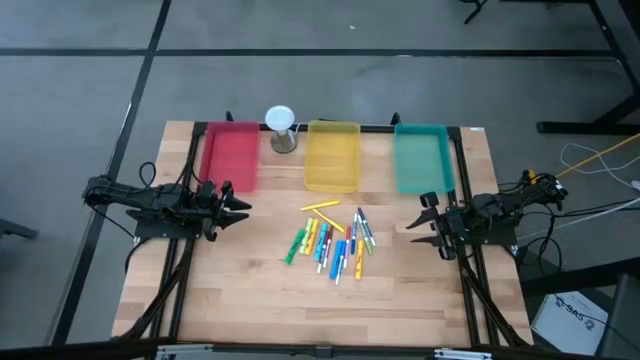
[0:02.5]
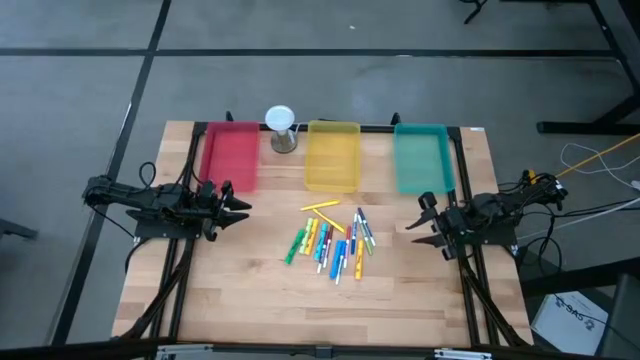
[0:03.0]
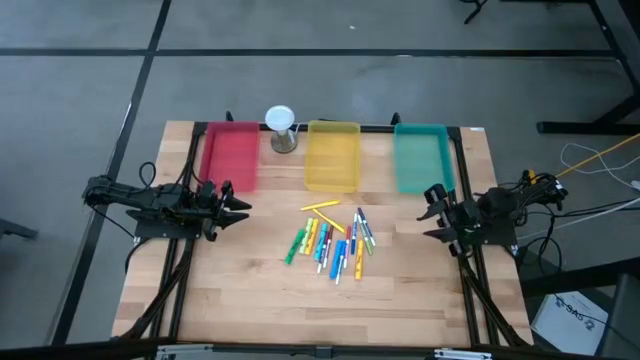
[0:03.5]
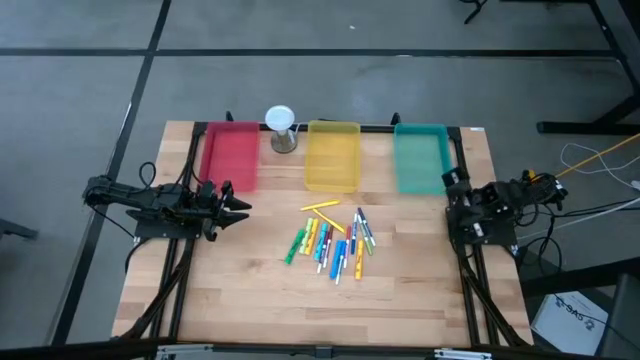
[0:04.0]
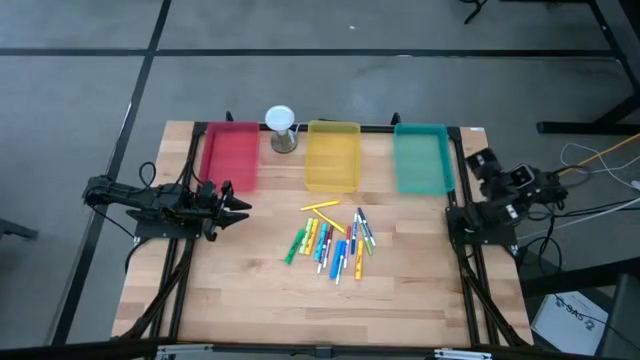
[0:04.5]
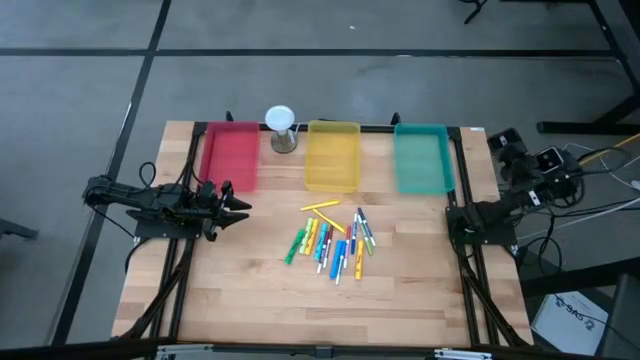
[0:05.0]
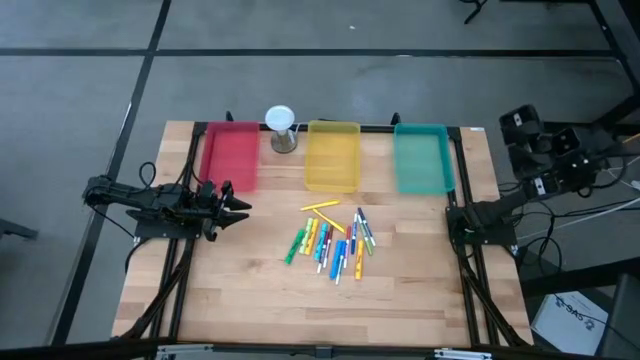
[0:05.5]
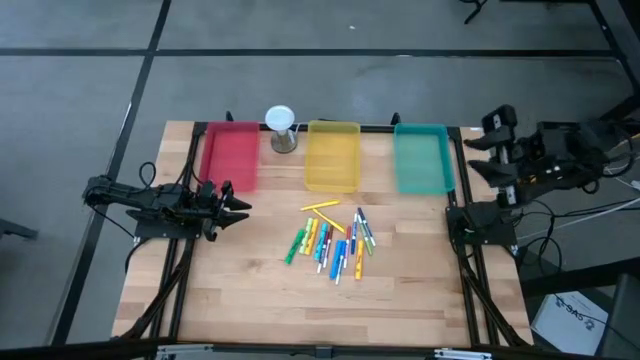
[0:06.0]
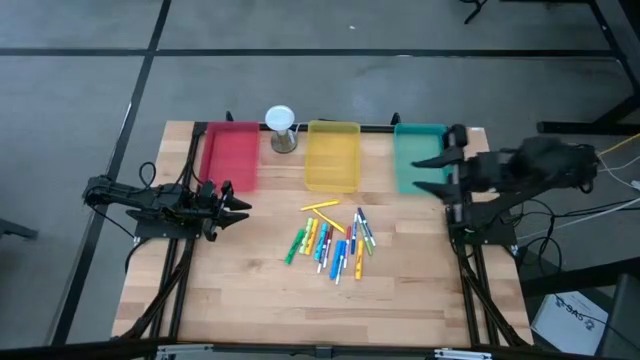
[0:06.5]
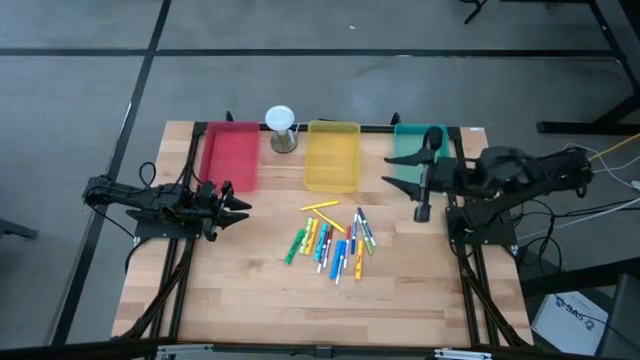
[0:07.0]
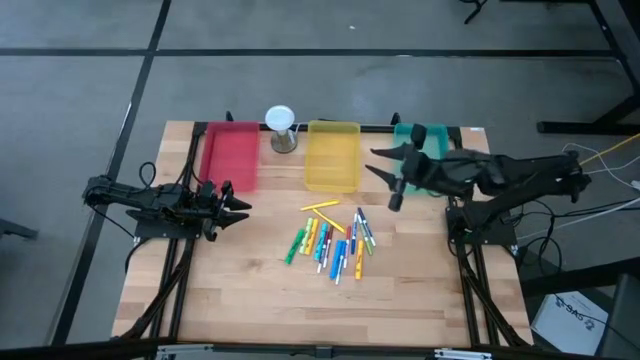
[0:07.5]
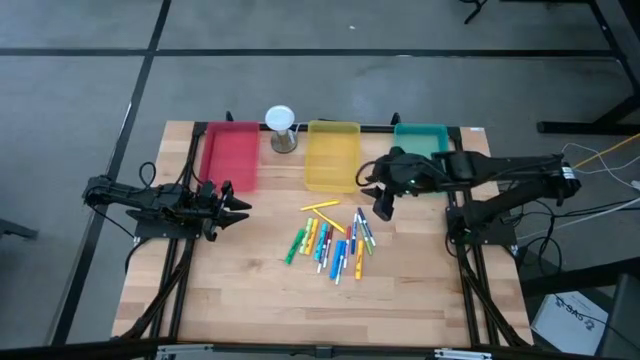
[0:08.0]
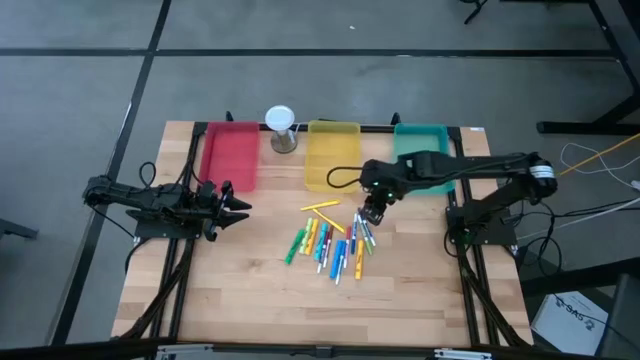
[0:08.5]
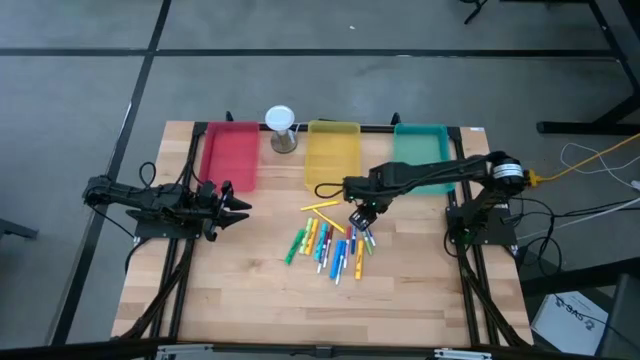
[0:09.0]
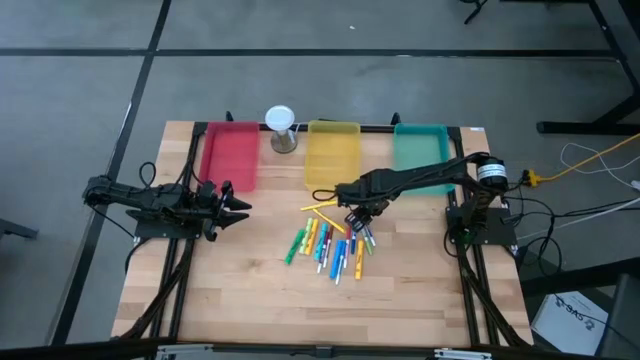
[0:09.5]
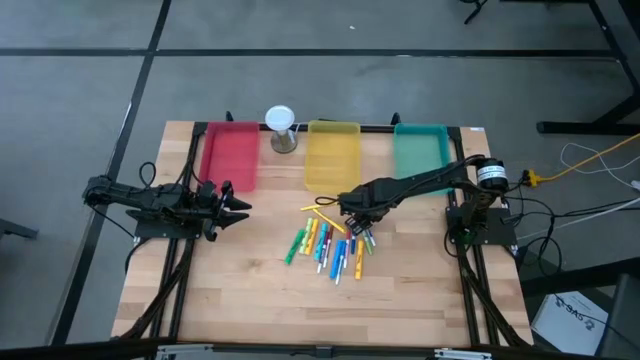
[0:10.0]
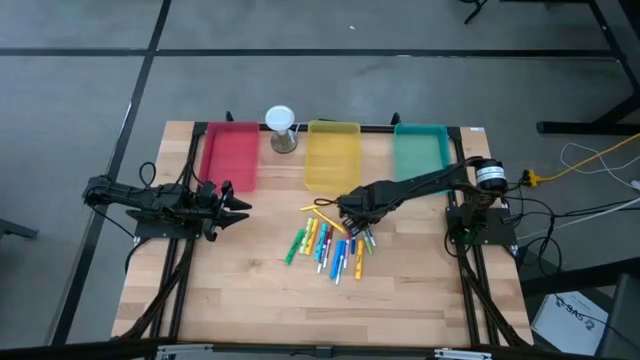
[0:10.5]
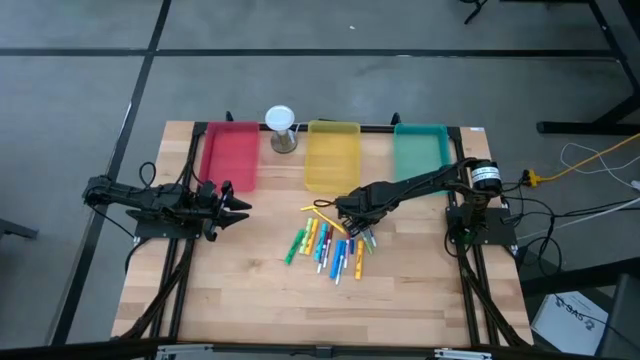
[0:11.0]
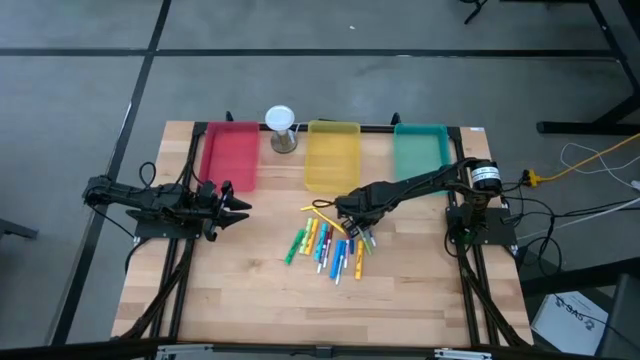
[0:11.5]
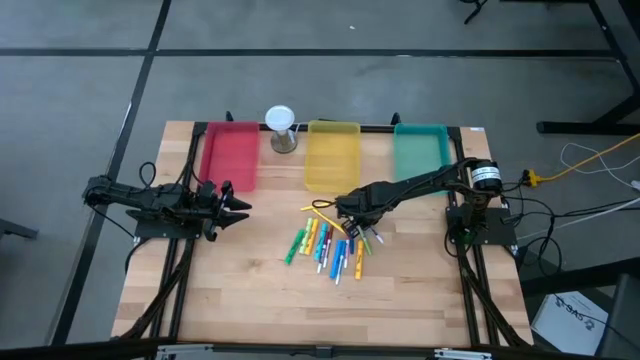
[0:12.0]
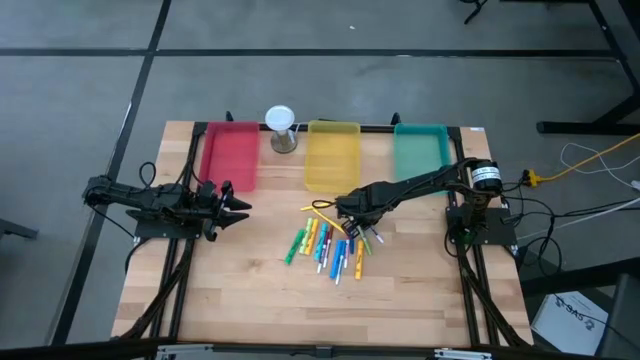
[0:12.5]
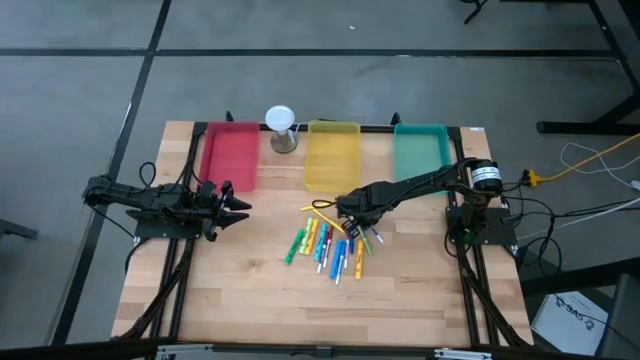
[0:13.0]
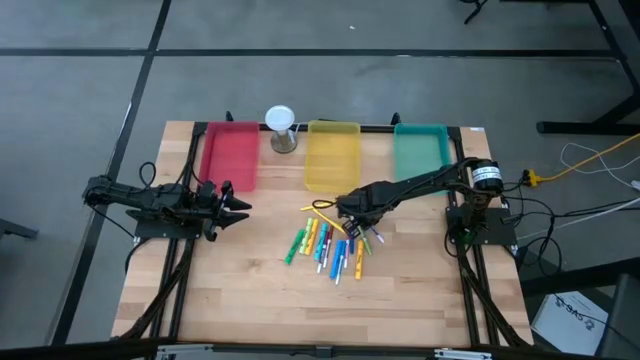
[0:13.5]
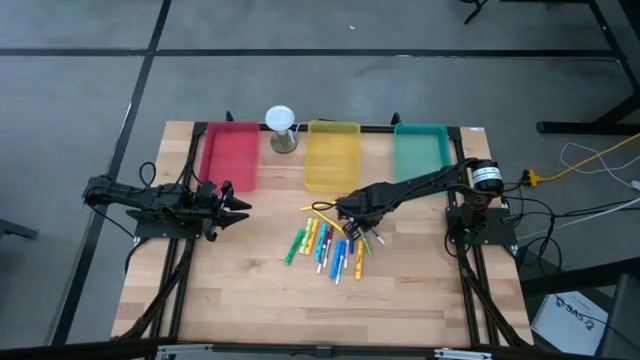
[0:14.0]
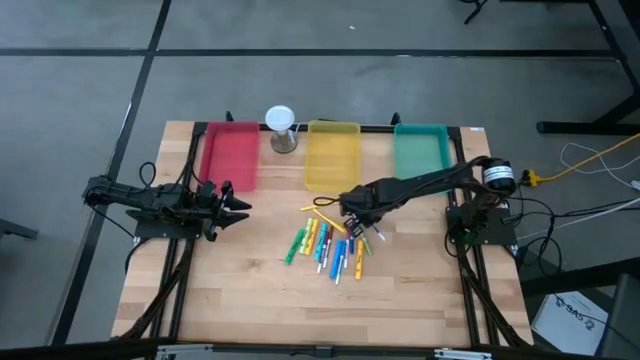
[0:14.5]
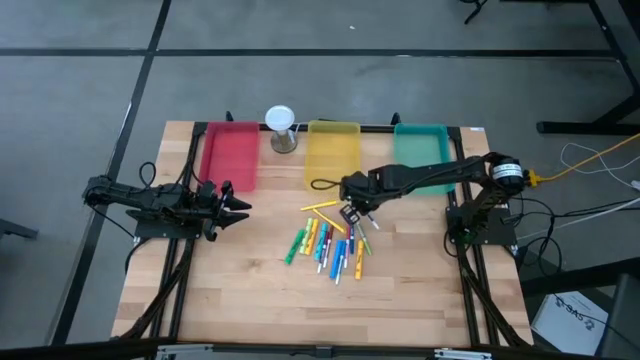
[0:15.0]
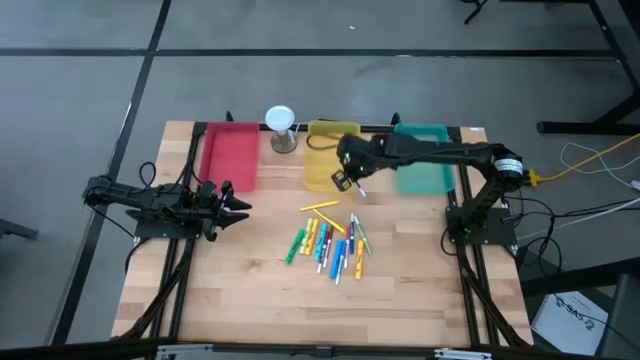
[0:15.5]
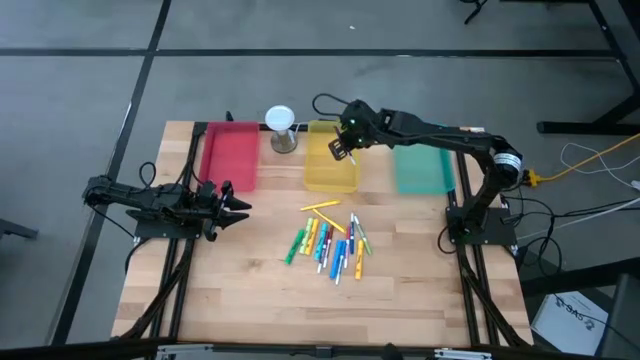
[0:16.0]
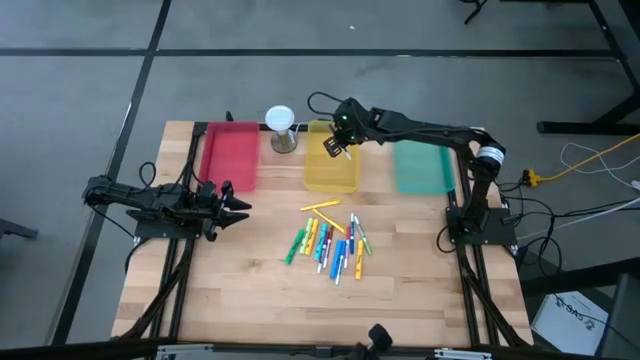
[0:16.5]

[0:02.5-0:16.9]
Task: Pick & Place Markers
Put the right blue marker into the yellow bin
